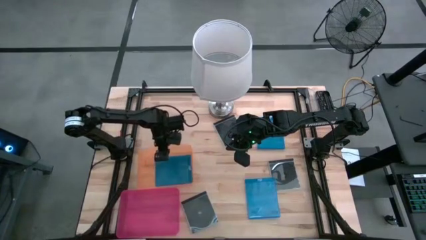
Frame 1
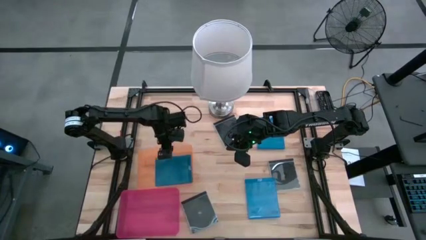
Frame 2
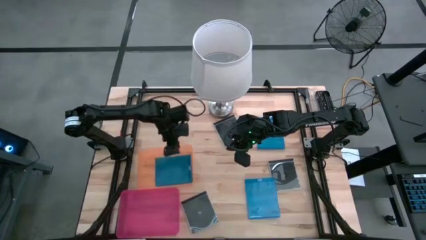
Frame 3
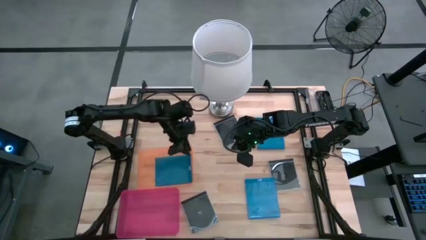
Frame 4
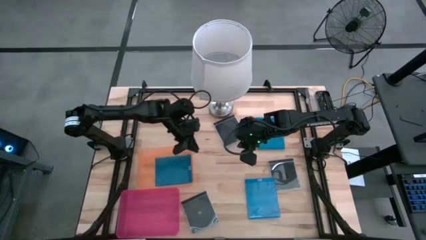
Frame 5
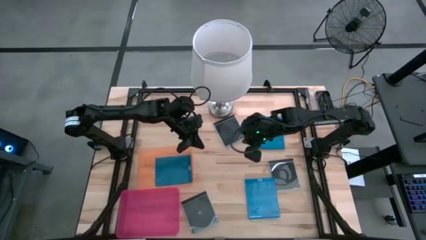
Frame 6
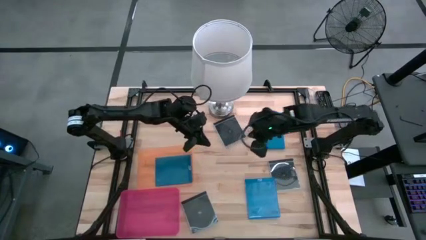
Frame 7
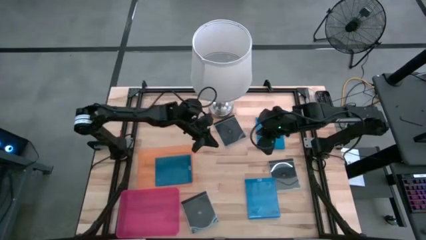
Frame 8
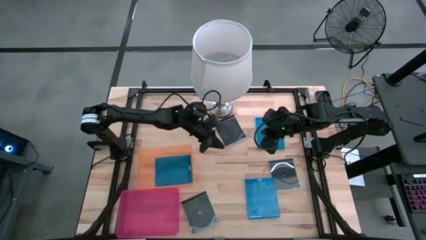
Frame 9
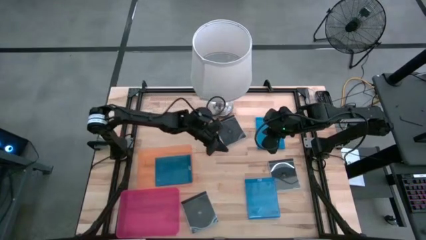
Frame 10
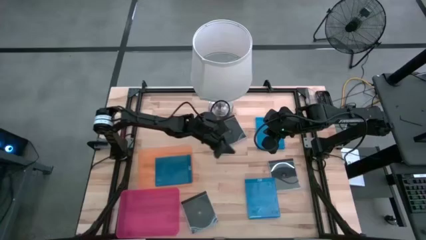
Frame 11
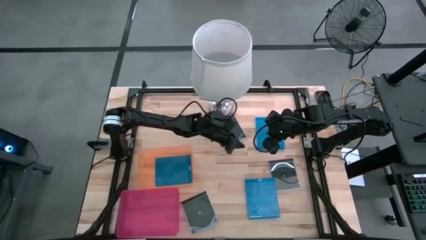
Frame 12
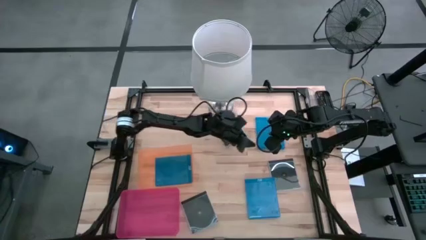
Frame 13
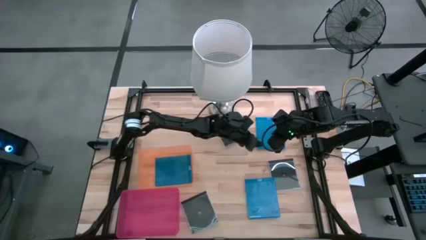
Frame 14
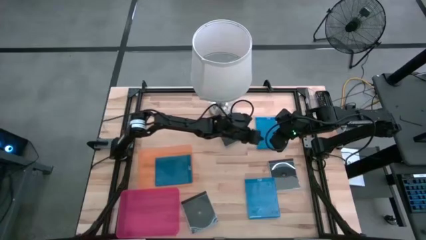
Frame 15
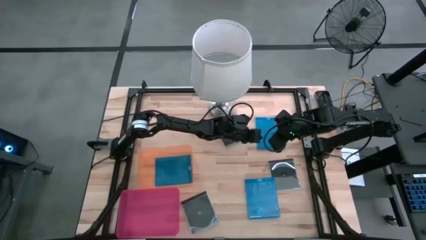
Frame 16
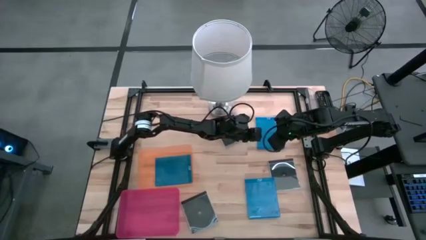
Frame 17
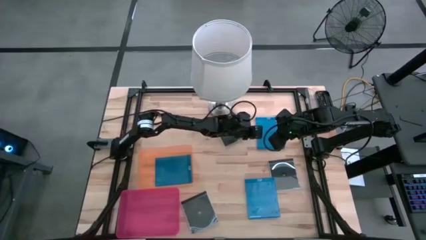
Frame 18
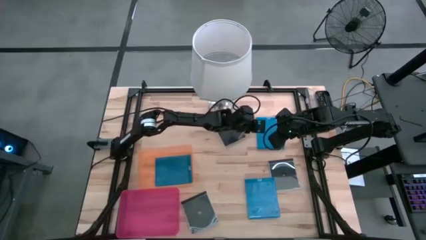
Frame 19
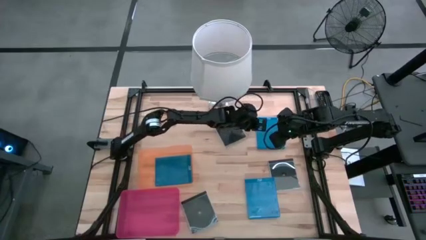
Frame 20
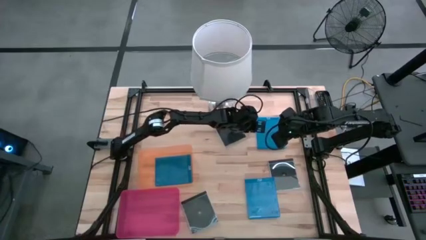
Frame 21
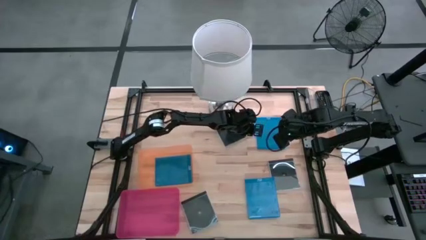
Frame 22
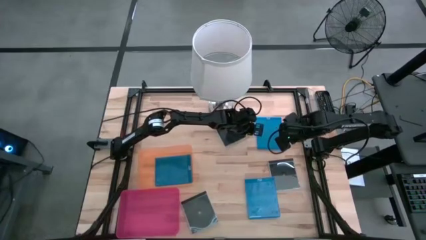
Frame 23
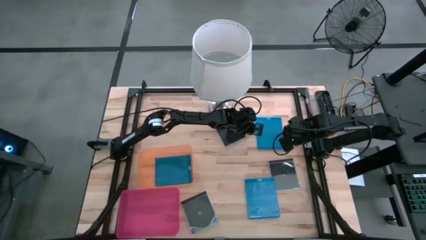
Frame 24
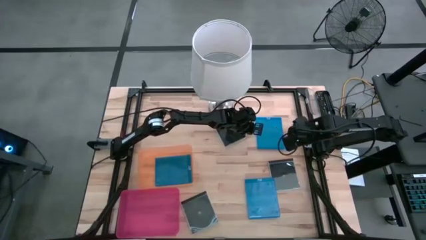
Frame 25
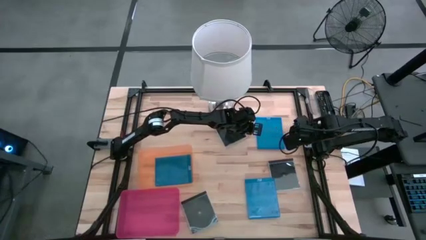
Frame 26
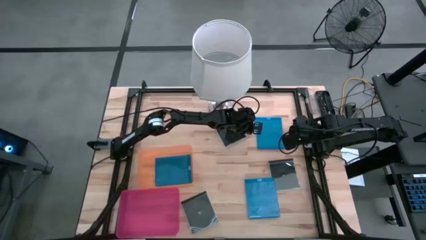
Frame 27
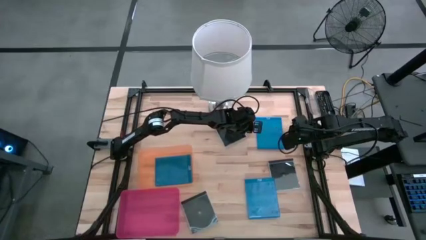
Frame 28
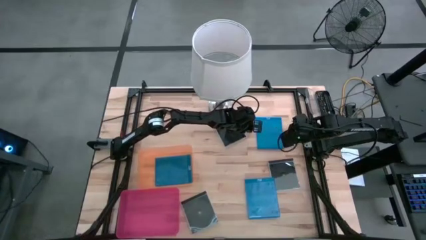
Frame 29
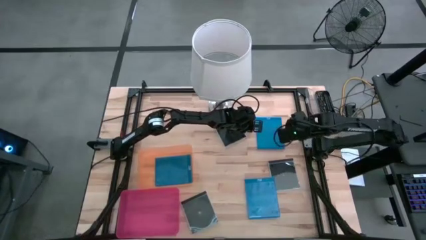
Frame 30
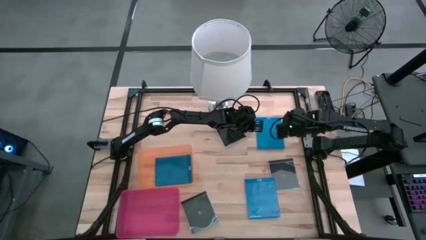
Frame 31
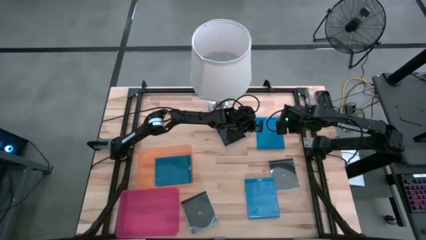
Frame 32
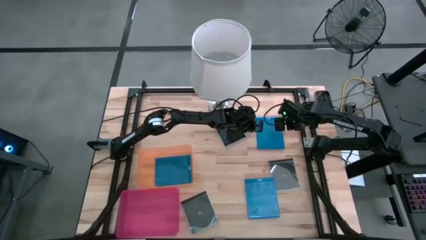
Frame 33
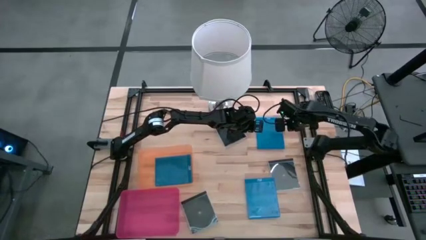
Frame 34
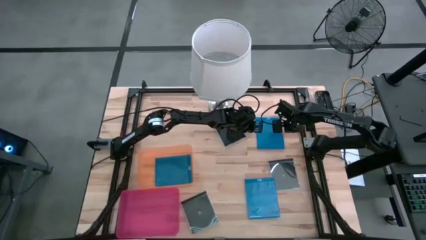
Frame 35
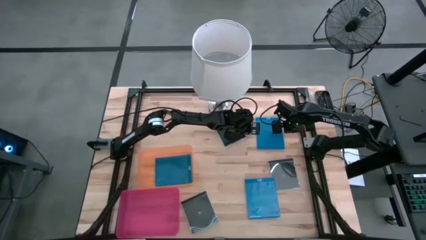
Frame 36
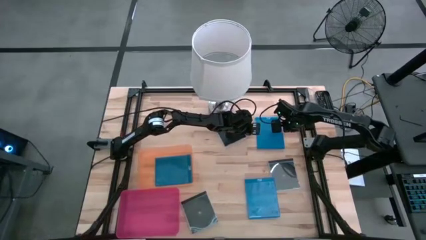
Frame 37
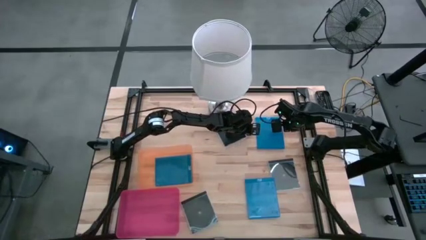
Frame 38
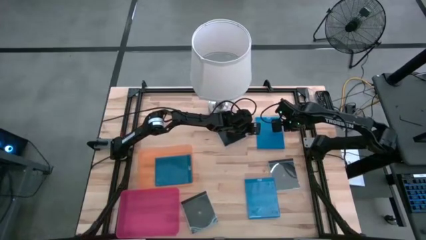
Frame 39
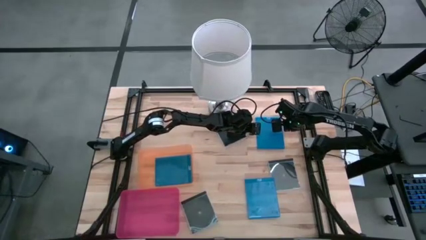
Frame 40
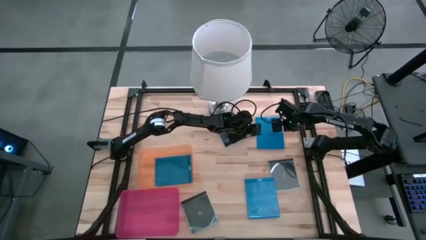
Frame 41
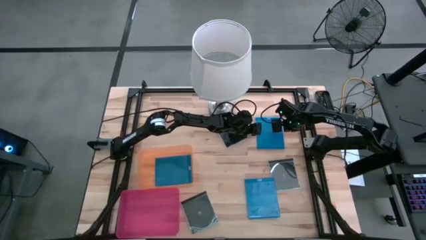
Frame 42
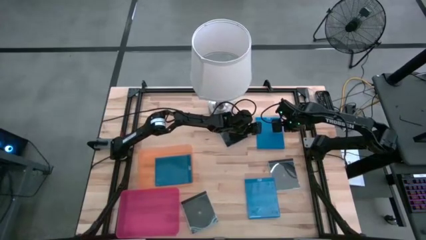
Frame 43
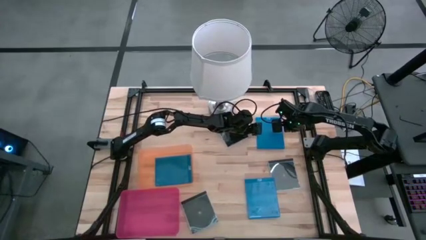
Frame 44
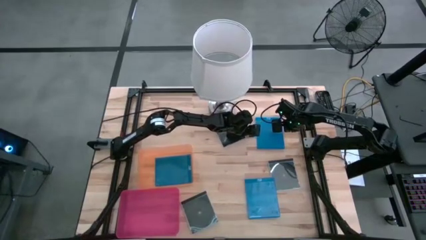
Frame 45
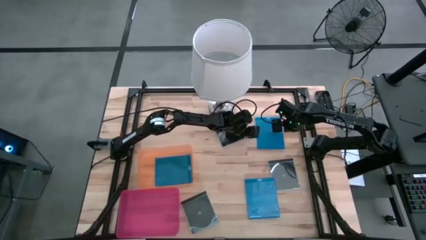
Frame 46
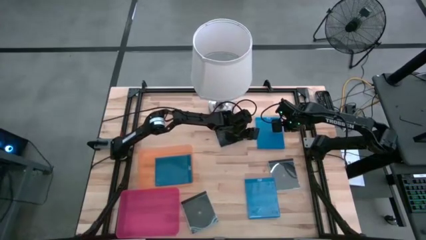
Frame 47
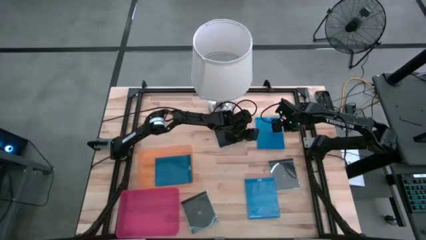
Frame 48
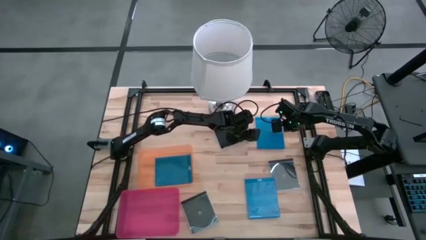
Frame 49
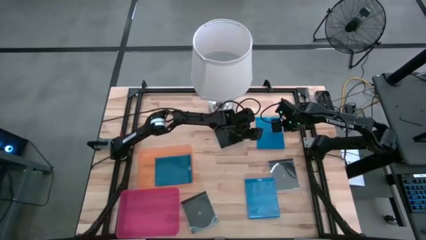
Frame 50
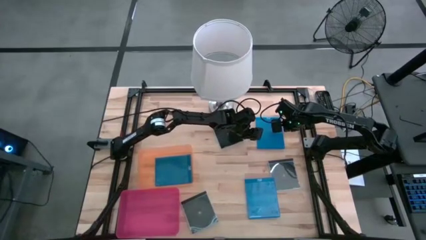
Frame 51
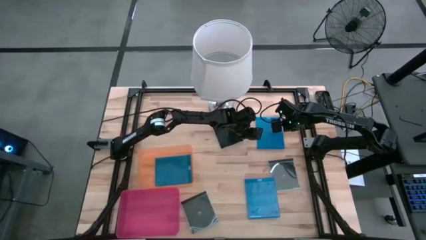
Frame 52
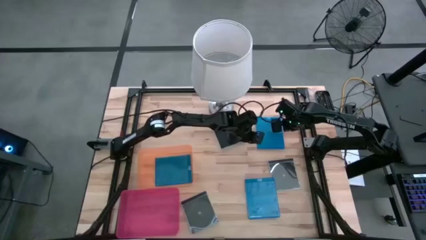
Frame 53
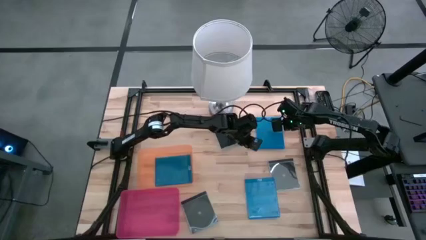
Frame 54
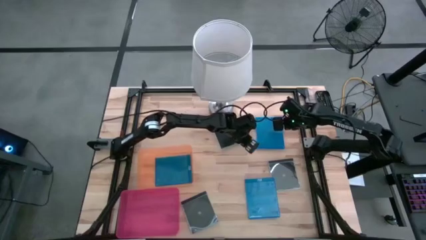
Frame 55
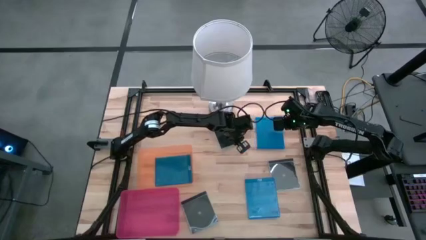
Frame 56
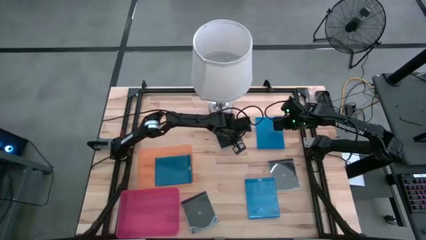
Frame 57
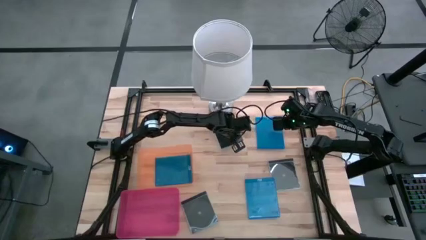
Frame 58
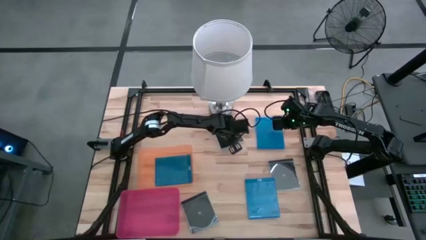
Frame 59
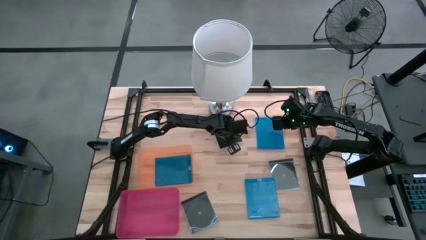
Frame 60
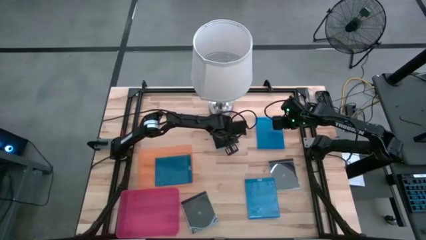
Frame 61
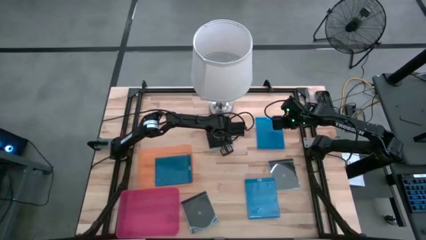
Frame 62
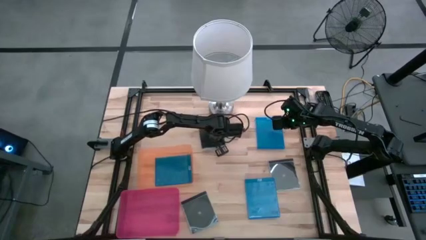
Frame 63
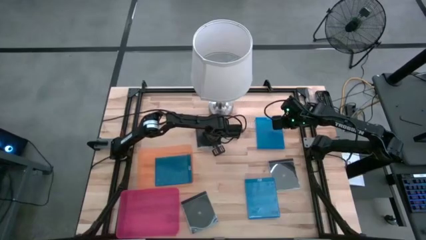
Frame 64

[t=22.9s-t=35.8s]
Task: Pick & place jewel cases by type
Adjust the top black cd case

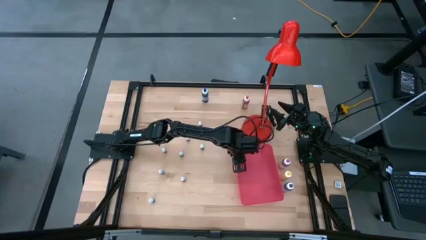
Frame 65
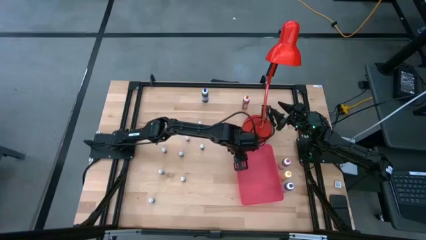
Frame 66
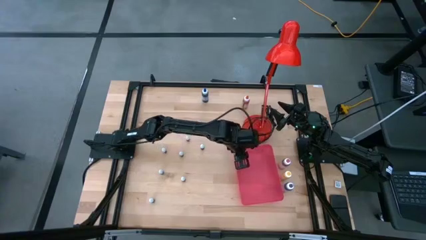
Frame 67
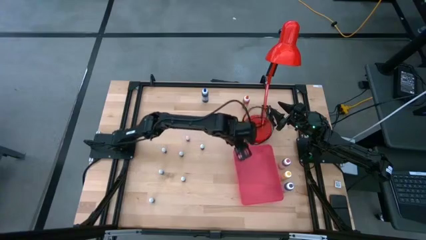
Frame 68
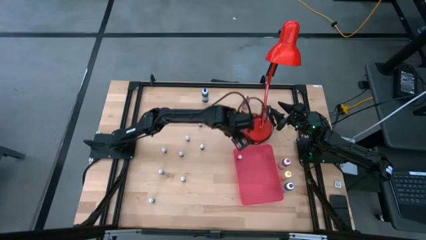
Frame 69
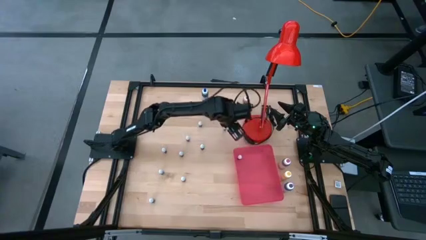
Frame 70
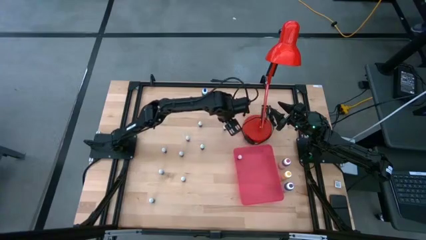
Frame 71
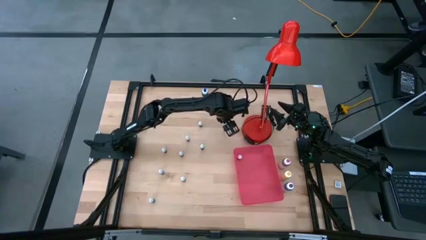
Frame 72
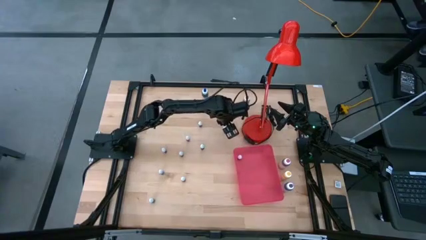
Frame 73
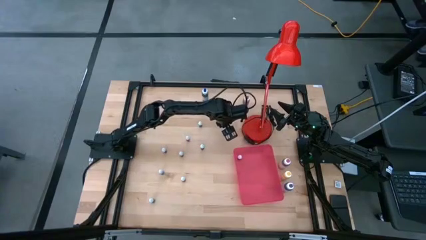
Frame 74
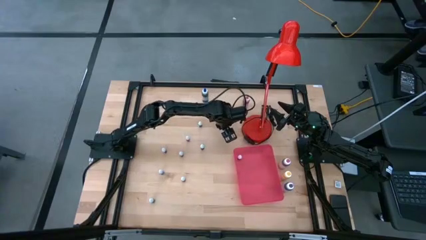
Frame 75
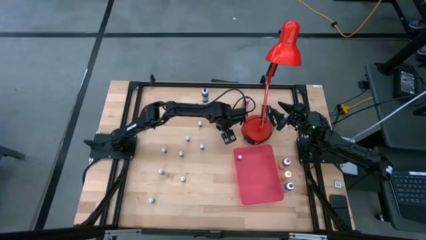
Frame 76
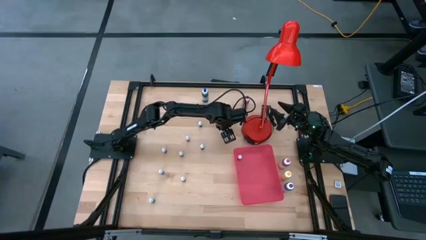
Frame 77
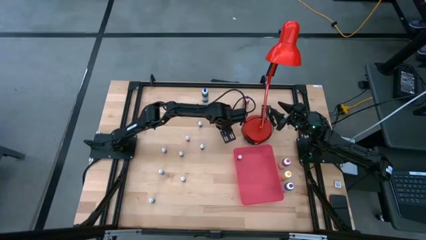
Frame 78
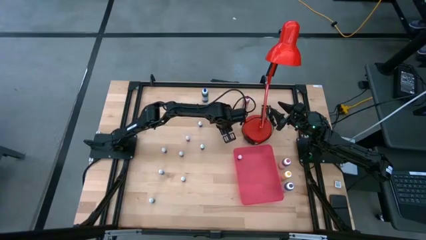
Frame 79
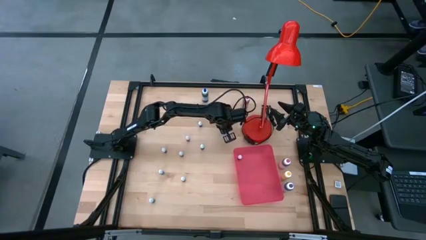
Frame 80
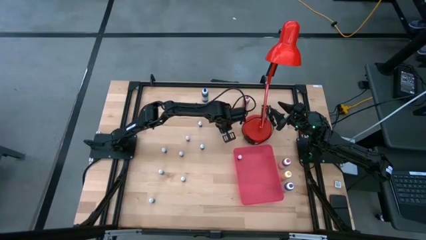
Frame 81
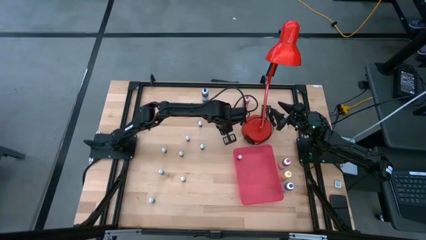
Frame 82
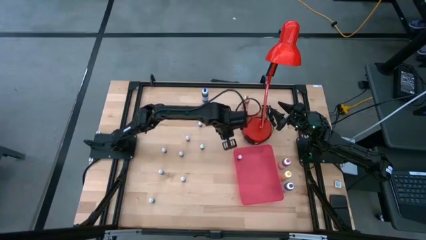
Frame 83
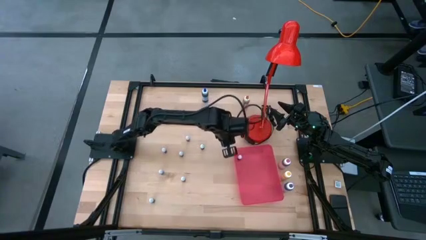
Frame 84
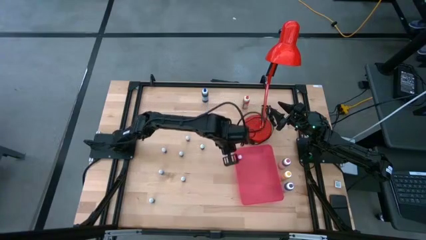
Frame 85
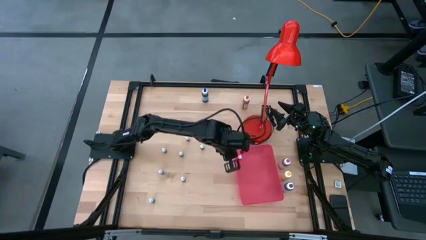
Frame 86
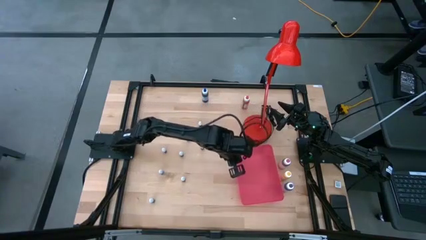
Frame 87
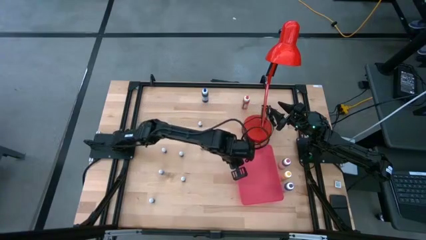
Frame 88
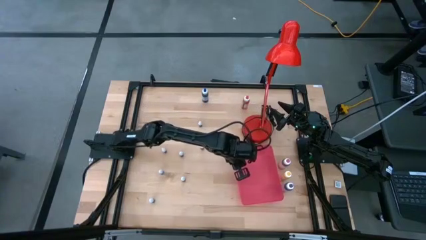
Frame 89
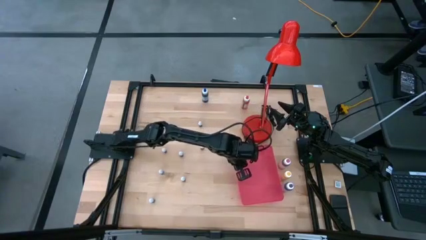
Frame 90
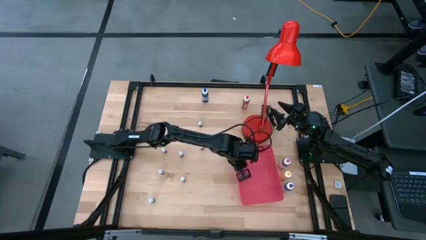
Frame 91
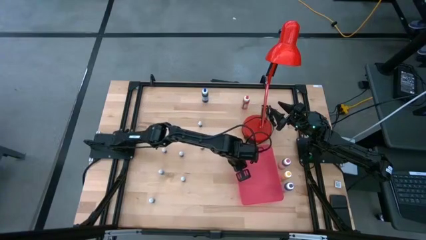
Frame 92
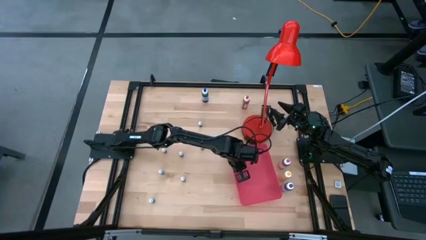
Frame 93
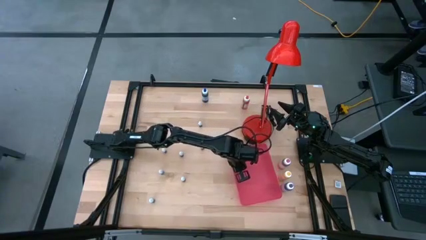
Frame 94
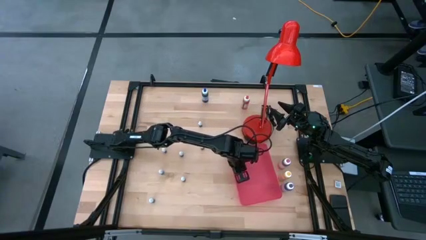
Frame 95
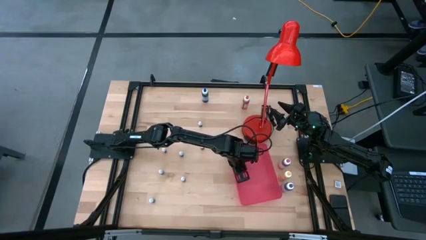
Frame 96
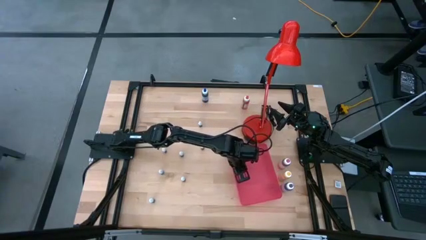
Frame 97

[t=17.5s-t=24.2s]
Task: Pick & Place food coloring
Put the small black food coloring bottle into the red bin
